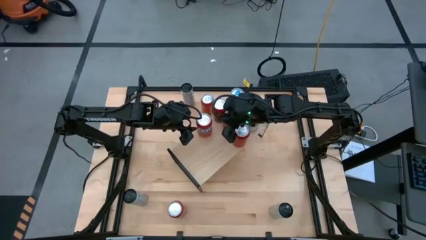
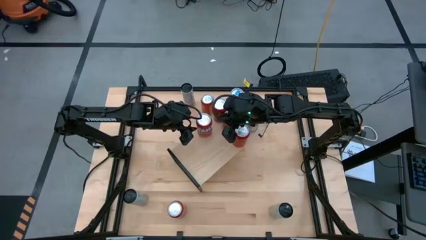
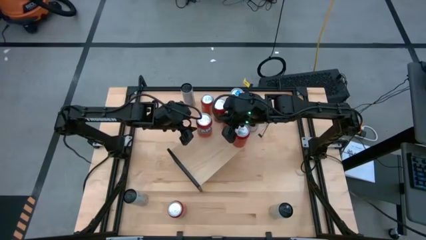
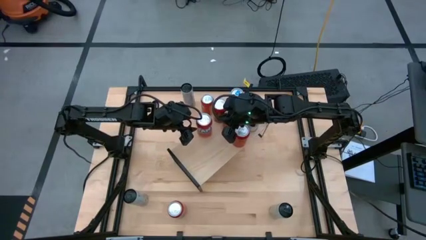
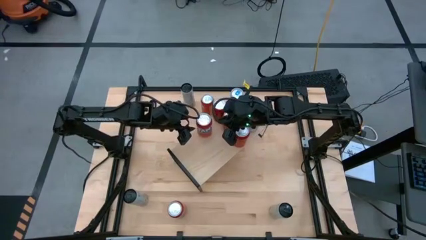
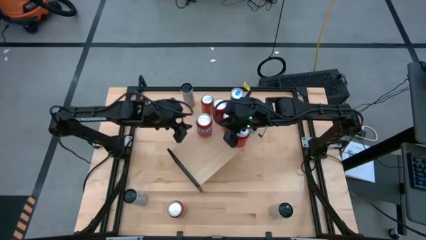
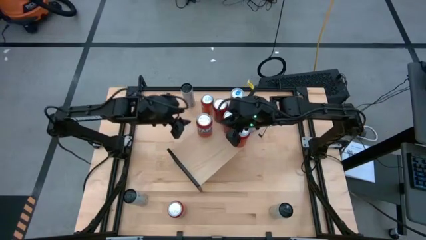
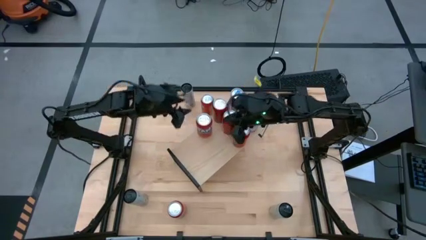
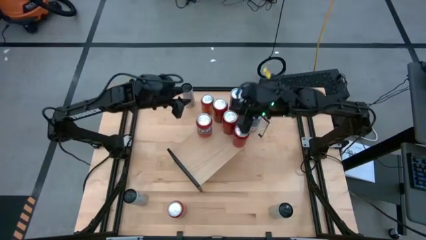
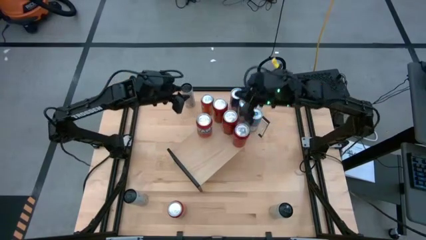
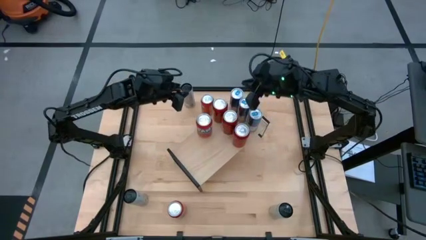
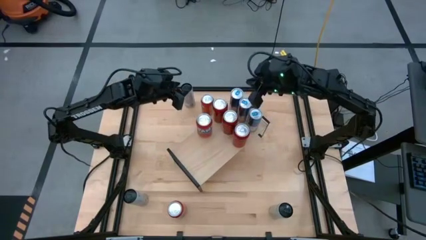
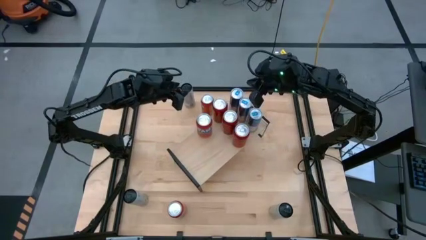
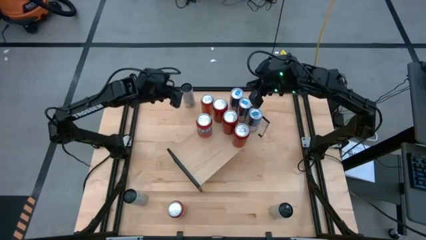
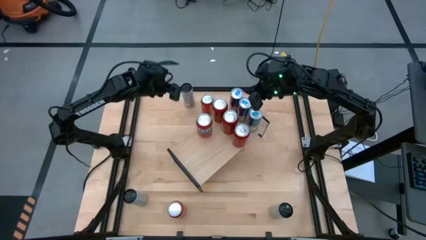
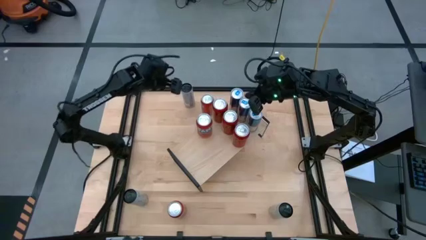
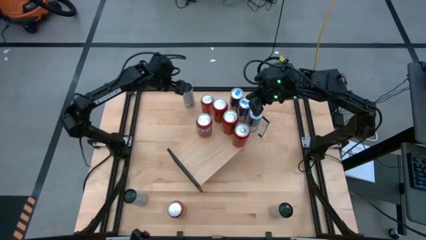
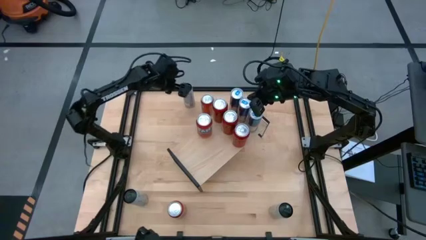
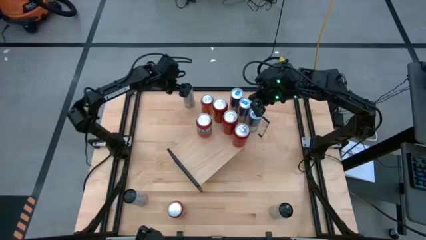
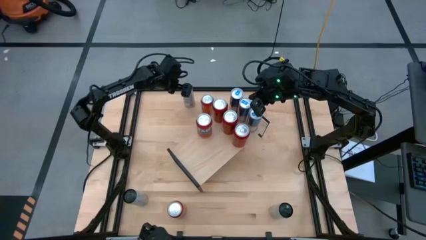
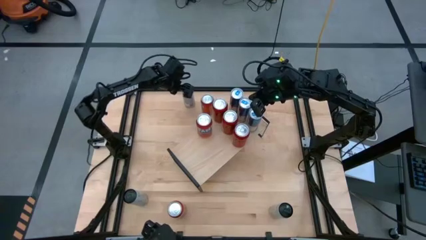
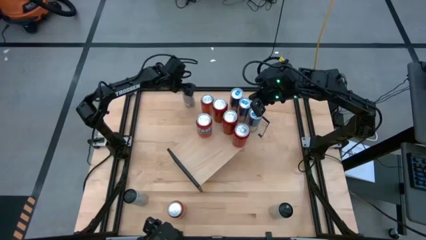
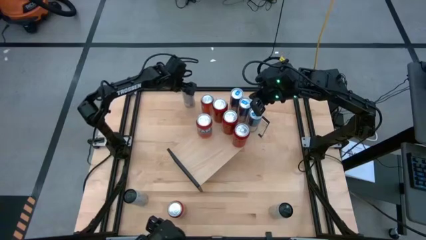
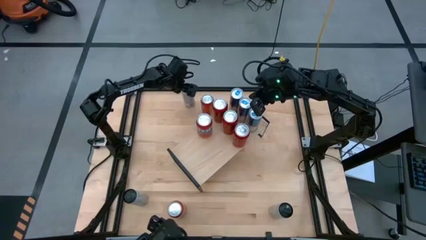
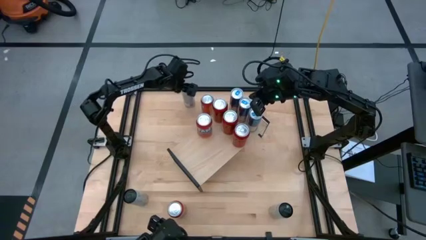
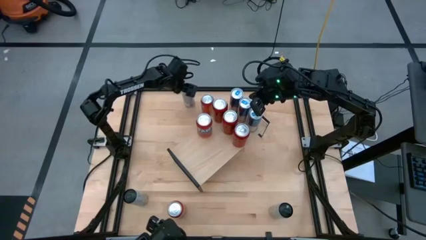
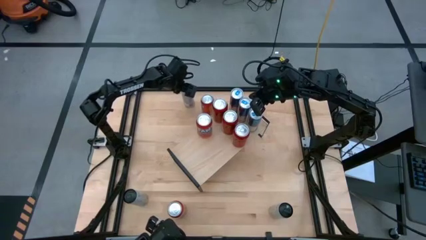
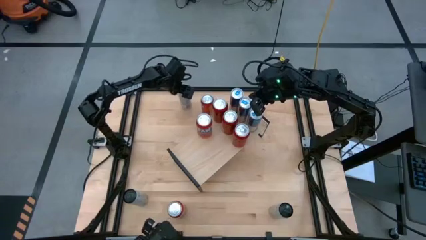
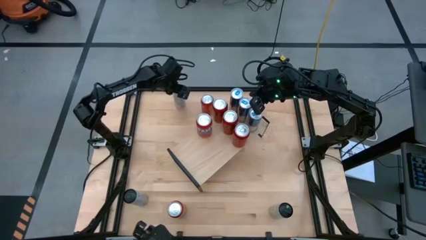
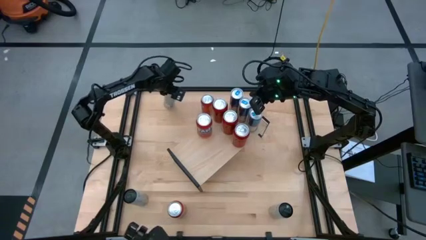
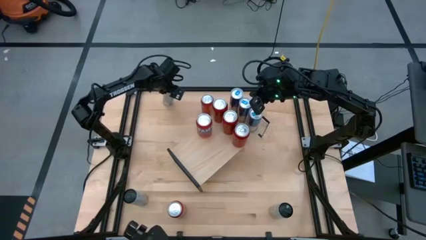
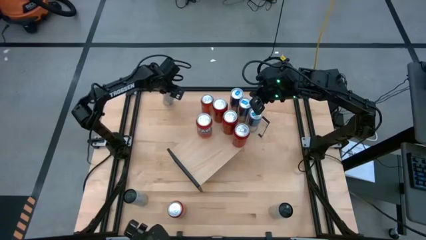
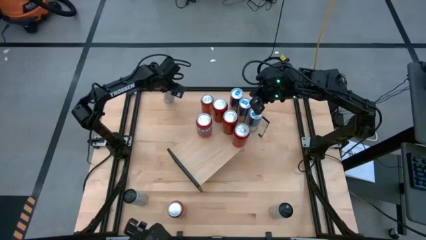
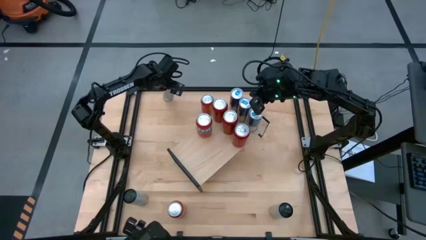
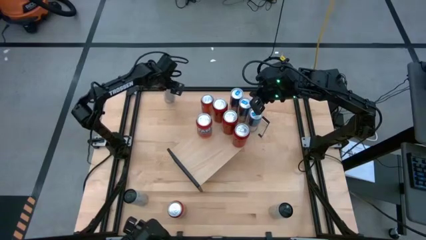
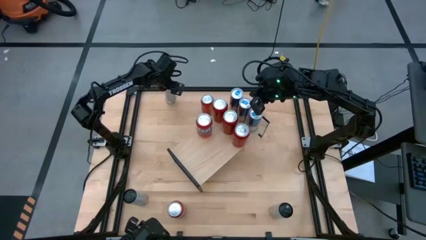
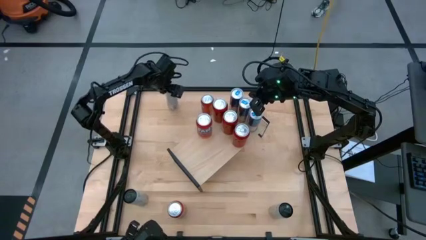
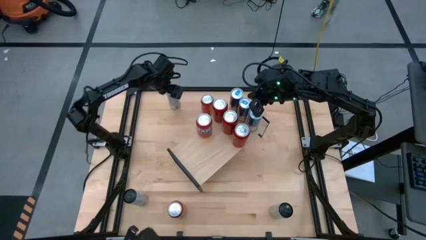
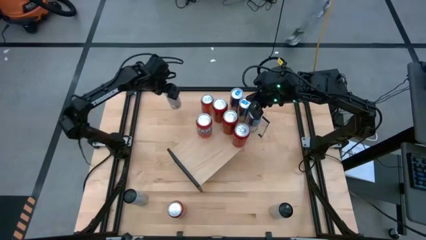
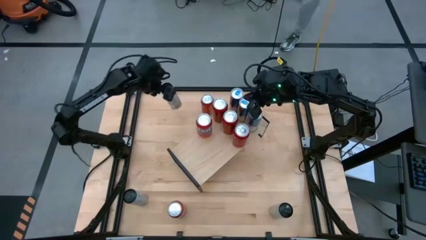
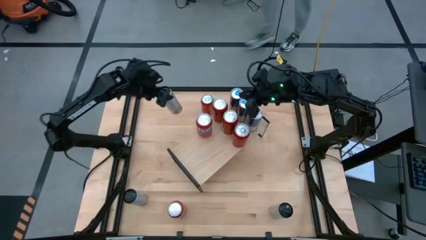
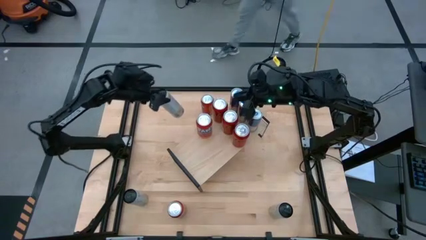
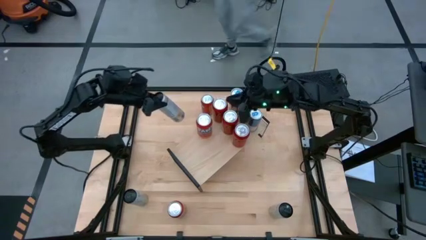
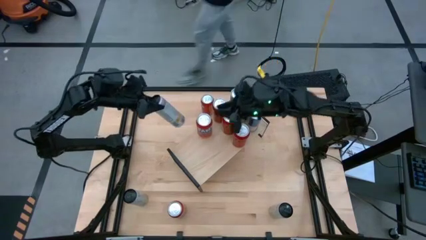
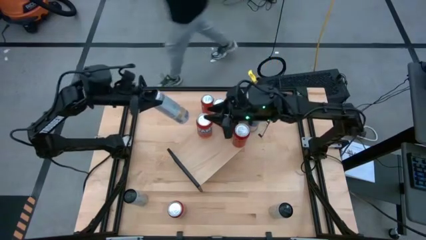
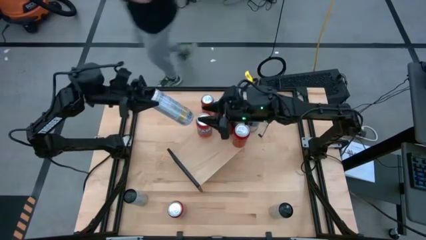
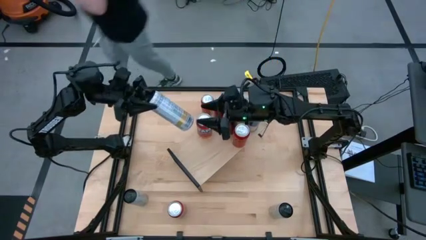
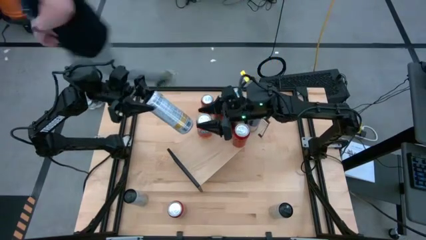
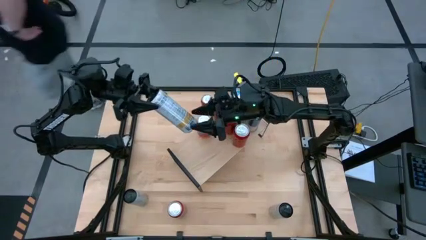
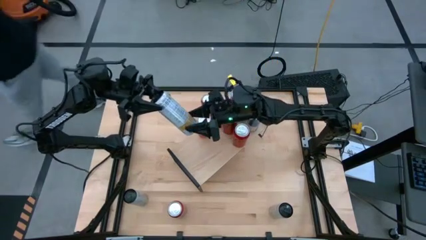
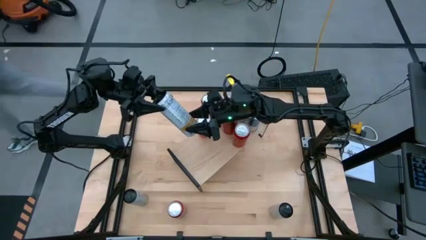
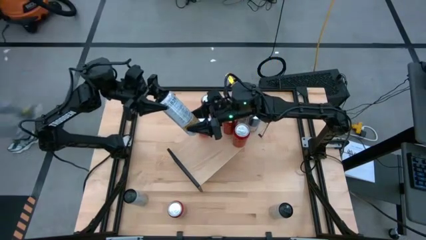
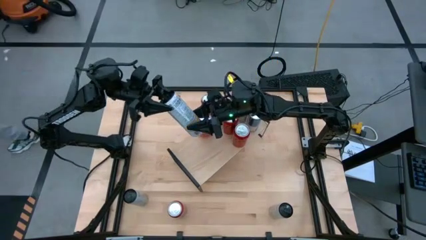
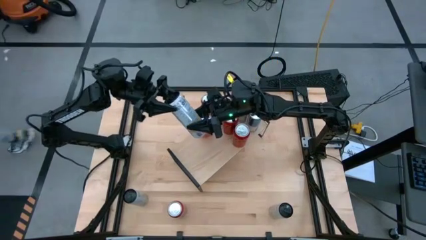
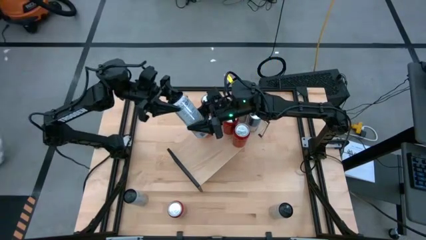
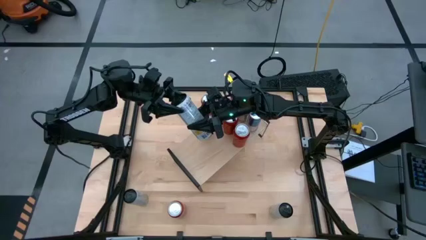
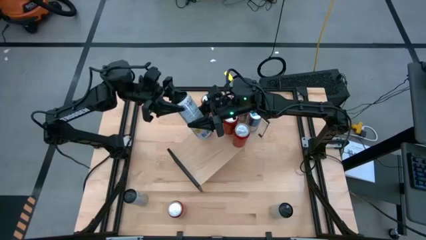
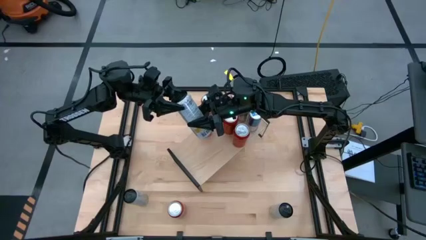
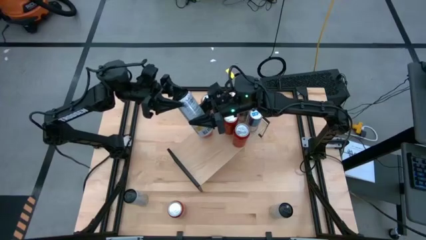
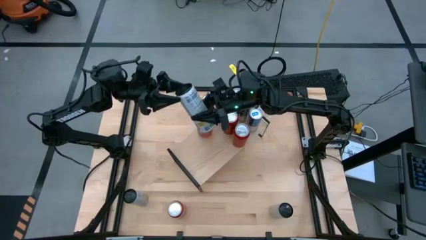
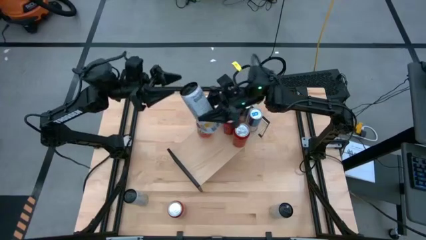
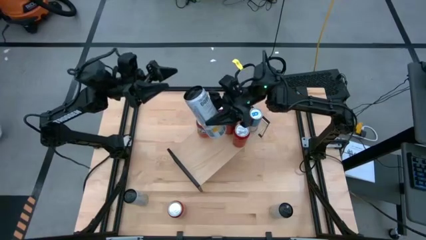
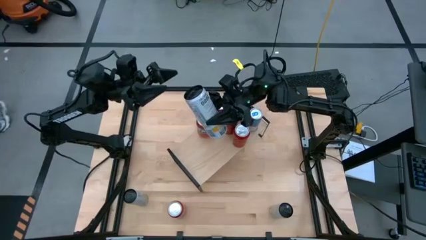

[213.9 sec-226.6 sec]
Task: Place canned beverage on shelf
Put the top white soda can on the shelf

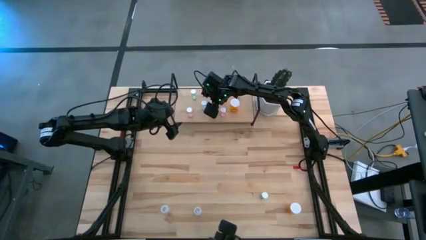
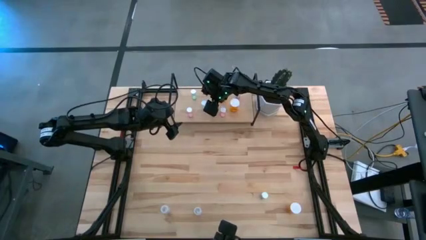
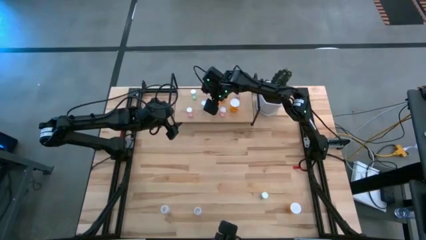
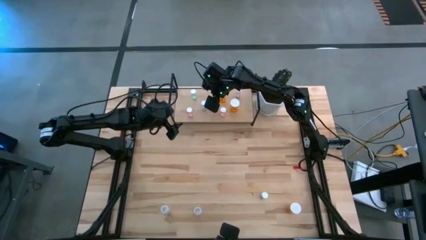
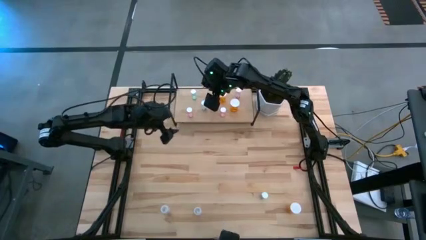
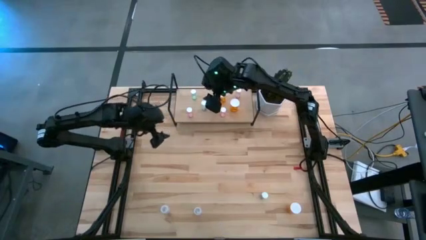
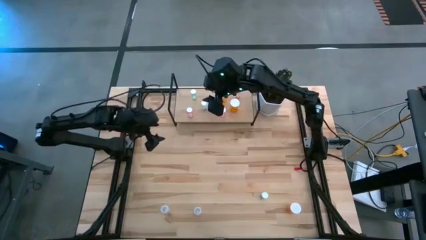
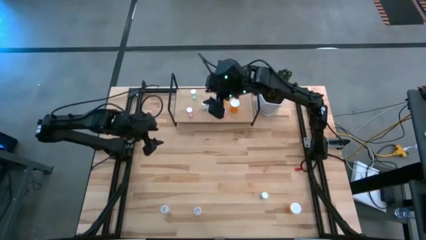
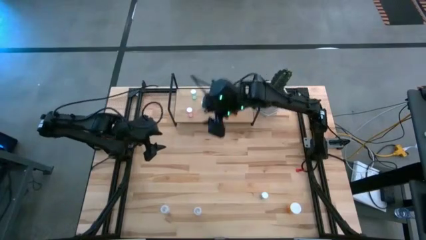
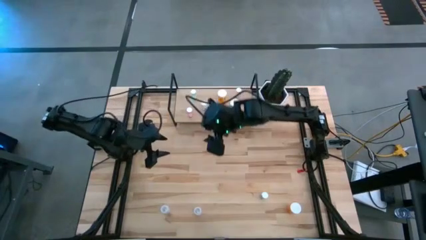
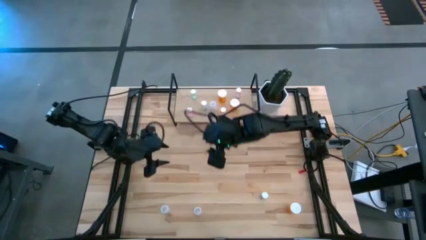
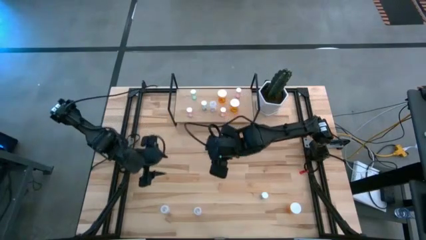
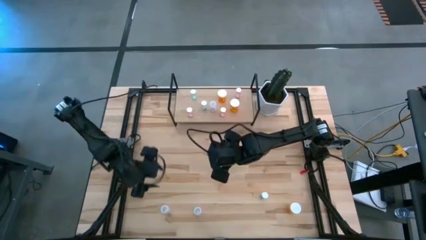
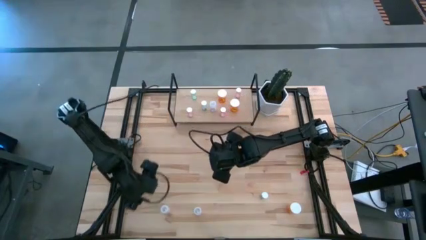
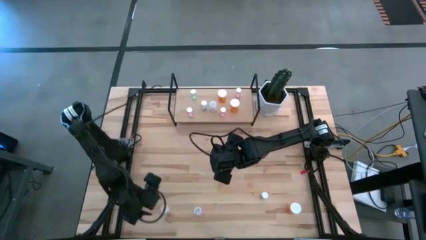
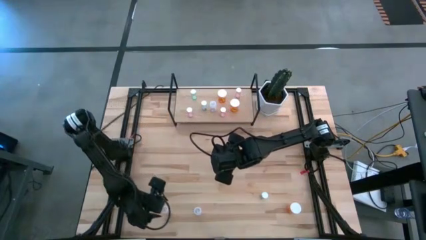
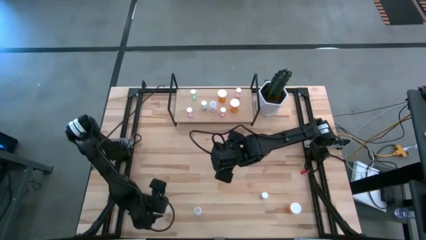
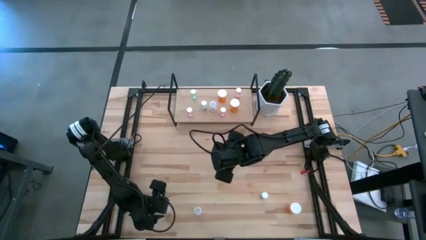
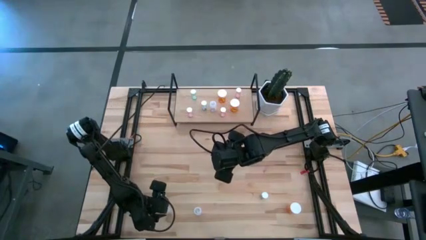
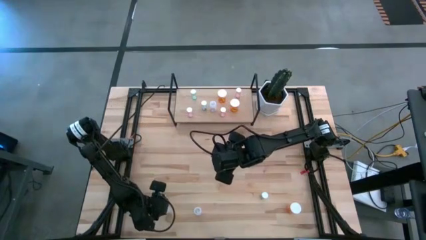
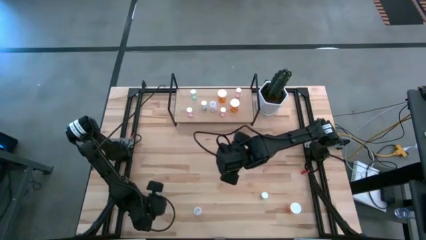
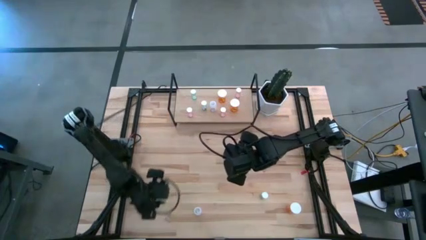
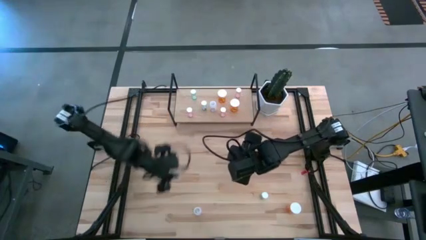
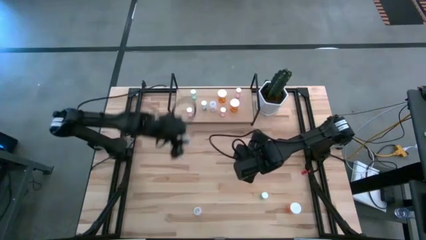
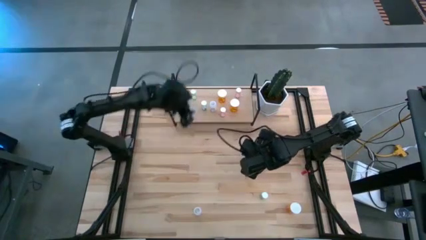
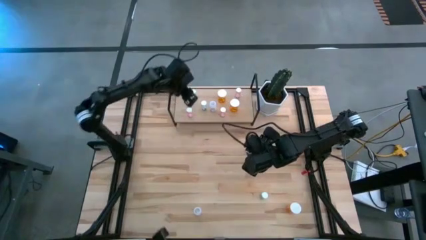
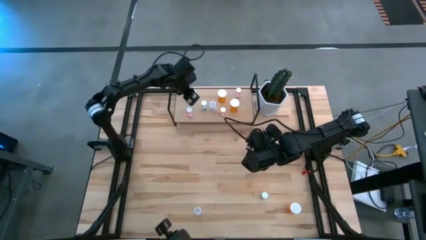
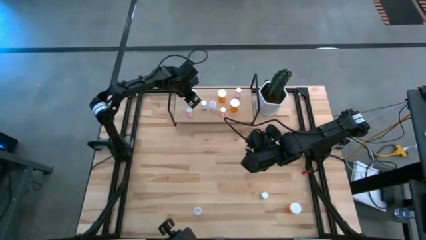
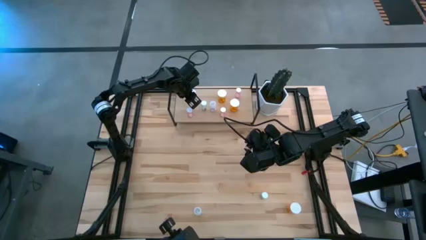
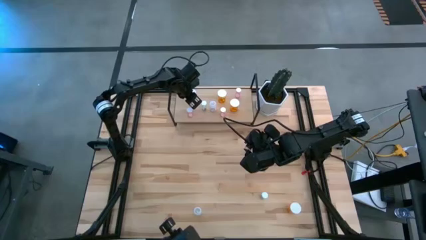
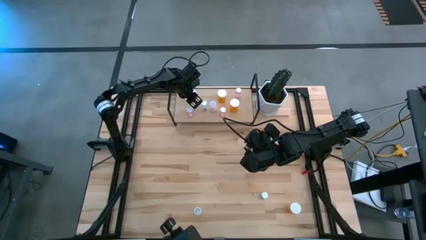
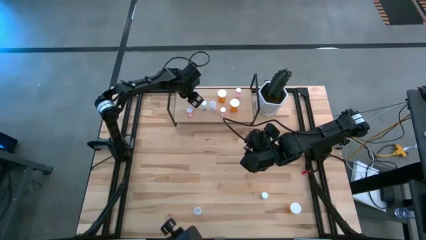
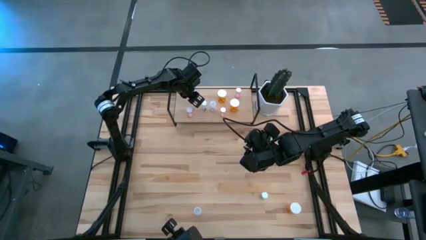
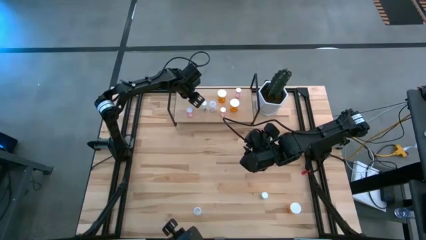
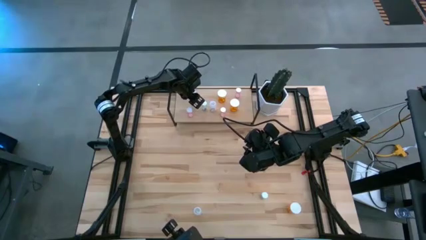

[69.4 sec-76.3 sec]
Task: Pick and place medicine bottles onto shelf by color
Put the left transparent pill bottle on the shelf
